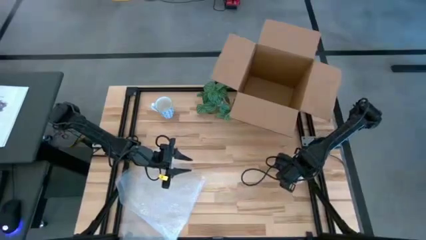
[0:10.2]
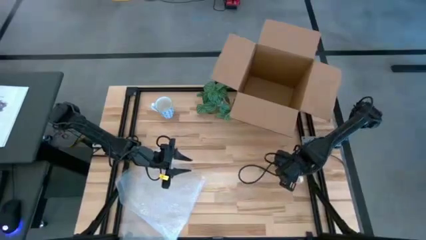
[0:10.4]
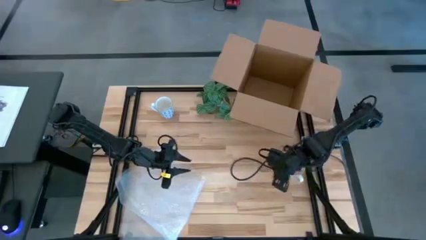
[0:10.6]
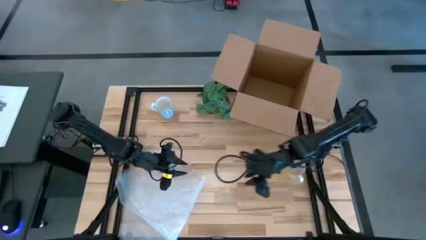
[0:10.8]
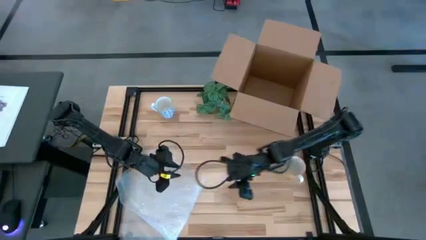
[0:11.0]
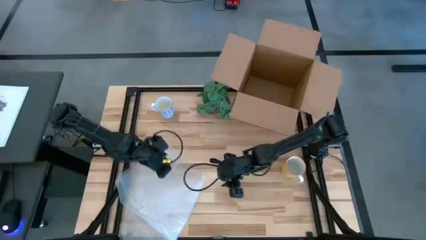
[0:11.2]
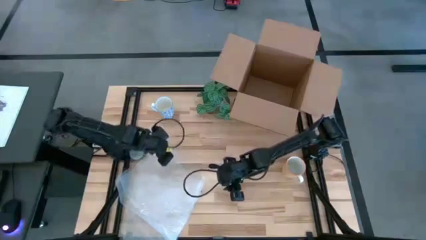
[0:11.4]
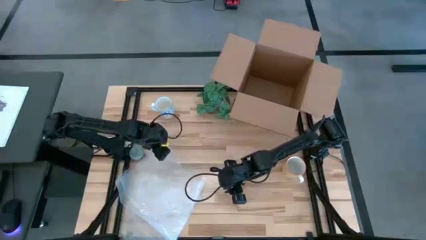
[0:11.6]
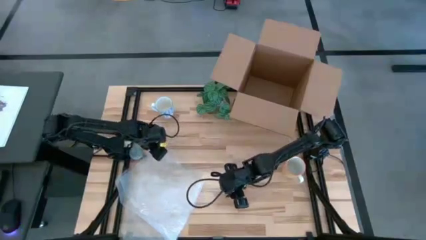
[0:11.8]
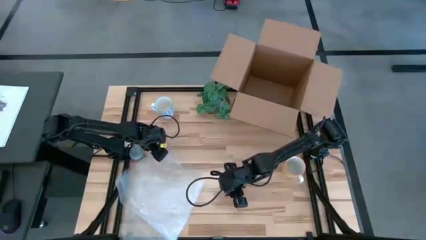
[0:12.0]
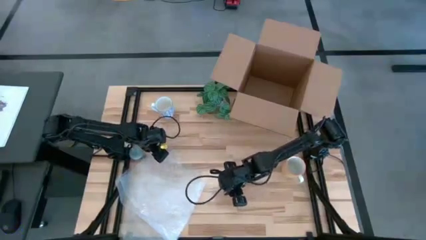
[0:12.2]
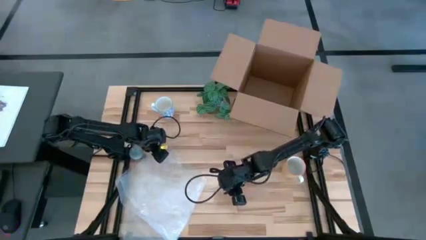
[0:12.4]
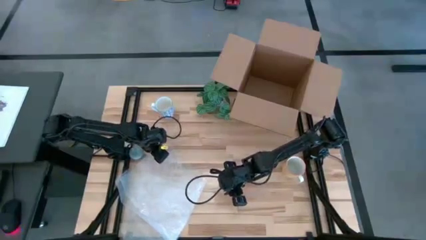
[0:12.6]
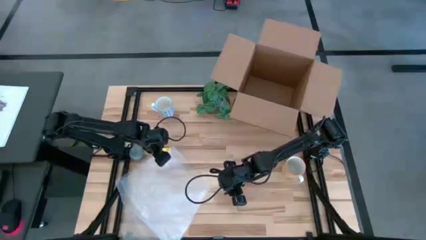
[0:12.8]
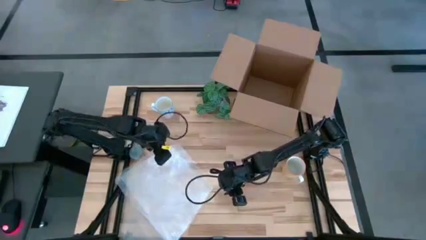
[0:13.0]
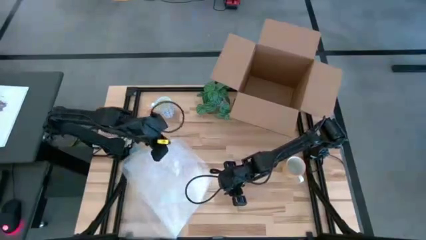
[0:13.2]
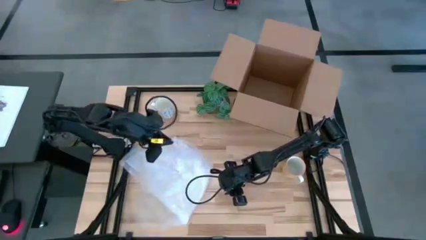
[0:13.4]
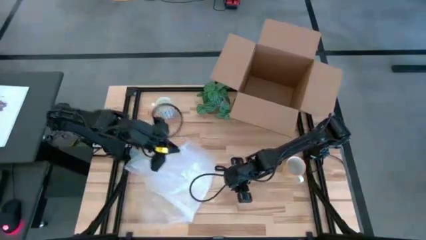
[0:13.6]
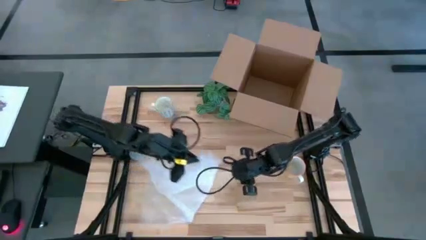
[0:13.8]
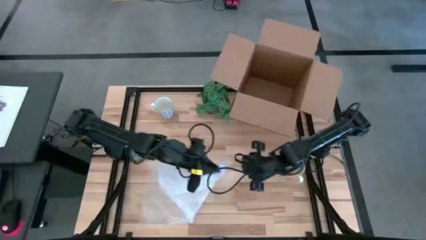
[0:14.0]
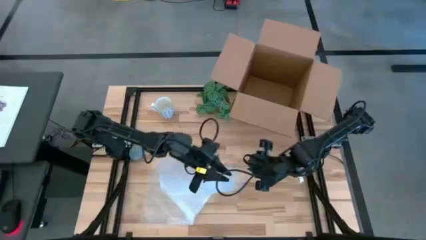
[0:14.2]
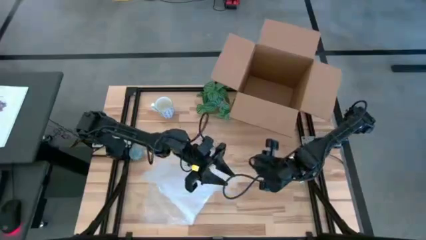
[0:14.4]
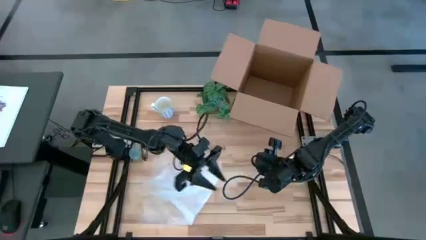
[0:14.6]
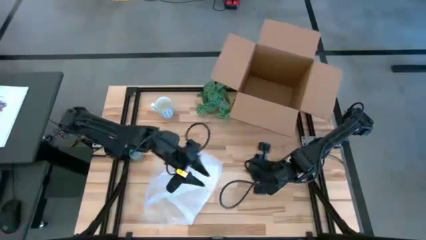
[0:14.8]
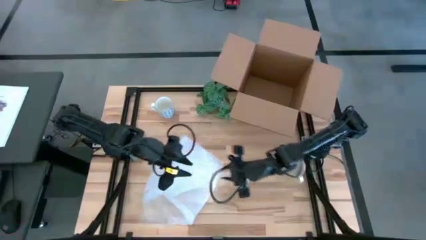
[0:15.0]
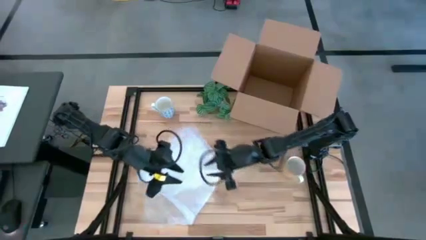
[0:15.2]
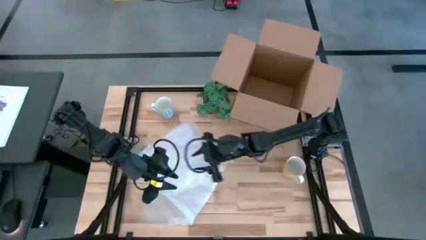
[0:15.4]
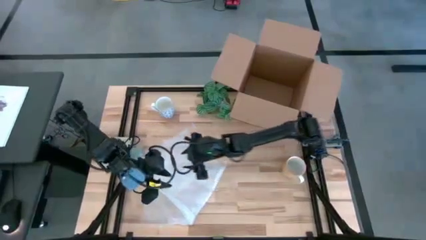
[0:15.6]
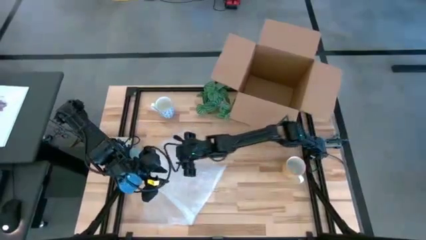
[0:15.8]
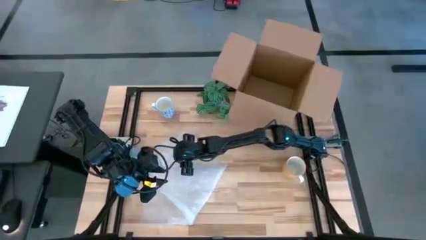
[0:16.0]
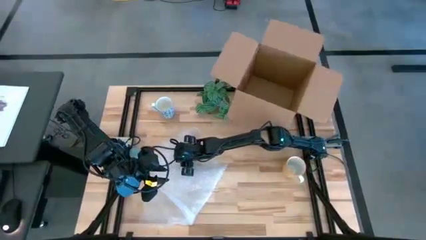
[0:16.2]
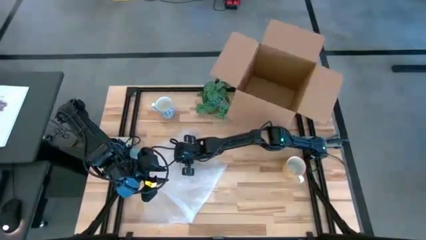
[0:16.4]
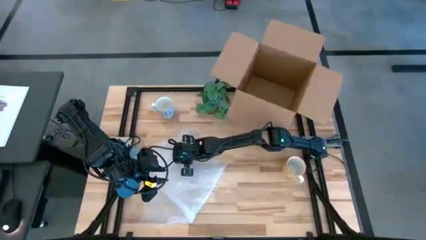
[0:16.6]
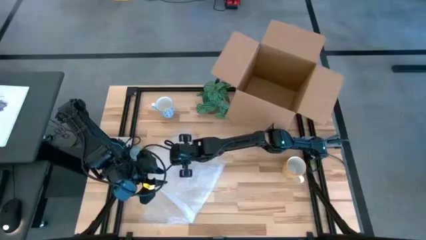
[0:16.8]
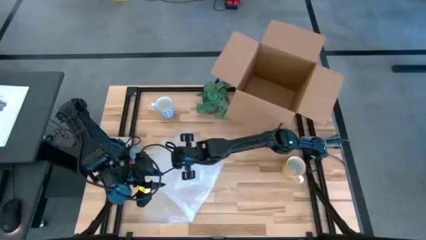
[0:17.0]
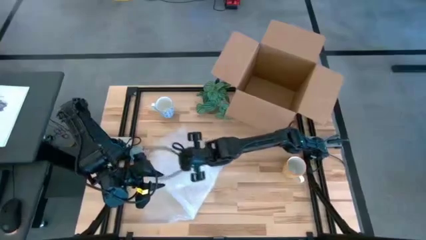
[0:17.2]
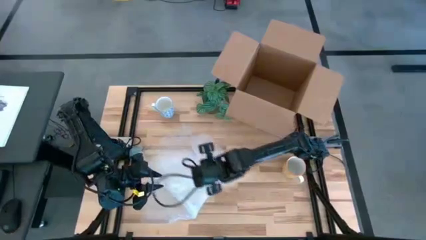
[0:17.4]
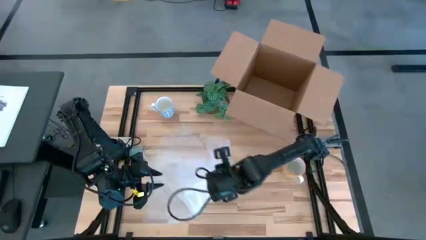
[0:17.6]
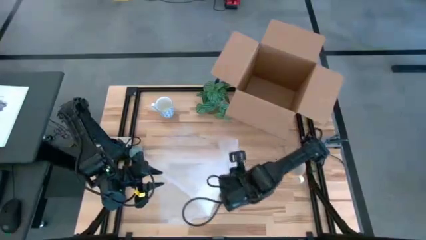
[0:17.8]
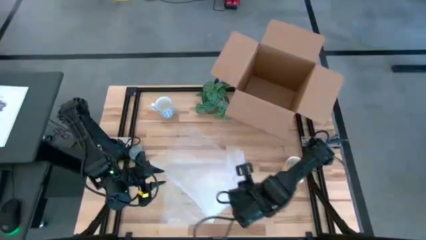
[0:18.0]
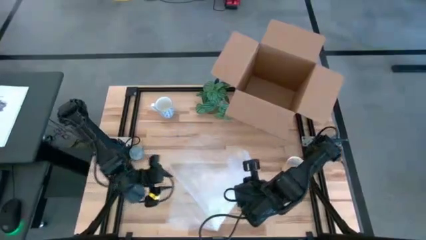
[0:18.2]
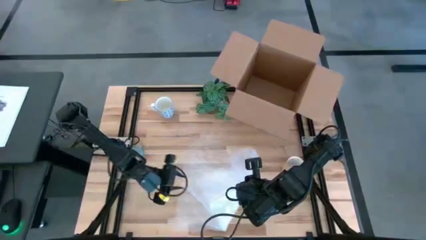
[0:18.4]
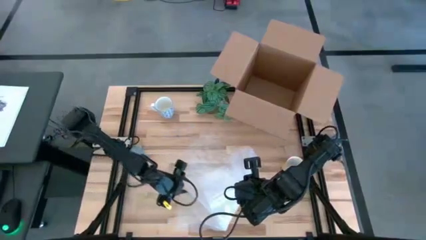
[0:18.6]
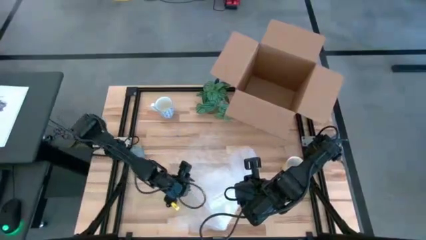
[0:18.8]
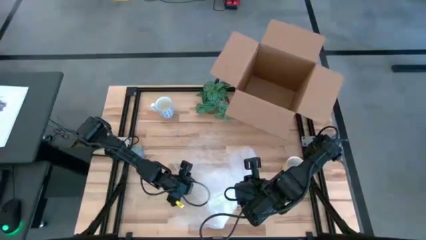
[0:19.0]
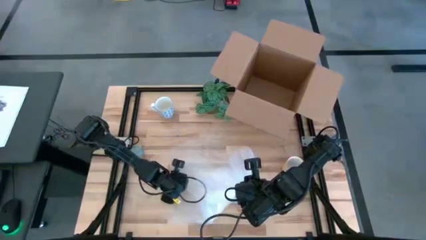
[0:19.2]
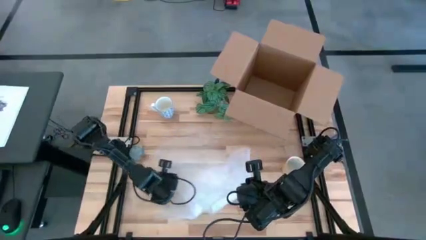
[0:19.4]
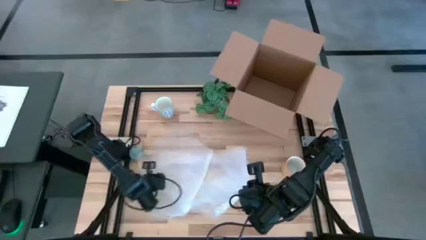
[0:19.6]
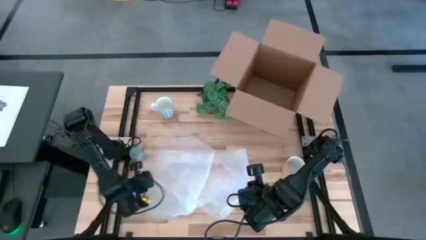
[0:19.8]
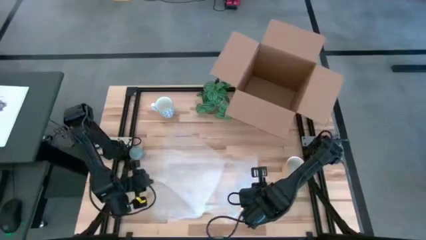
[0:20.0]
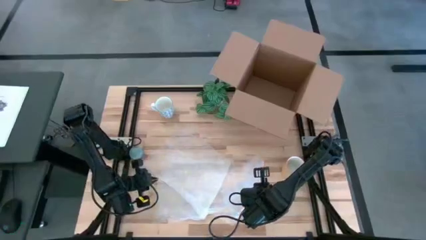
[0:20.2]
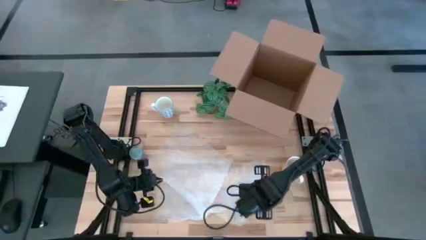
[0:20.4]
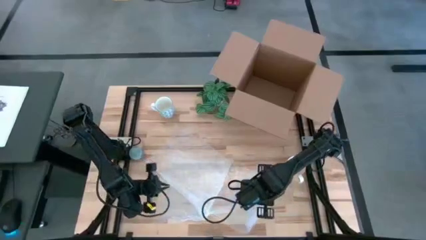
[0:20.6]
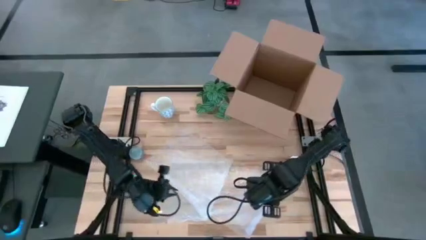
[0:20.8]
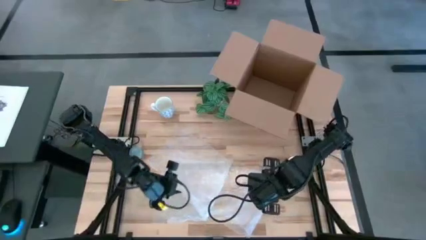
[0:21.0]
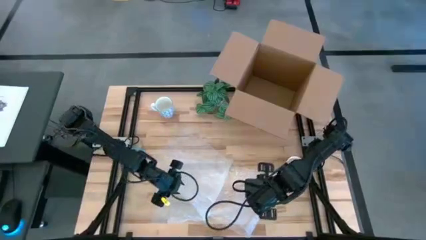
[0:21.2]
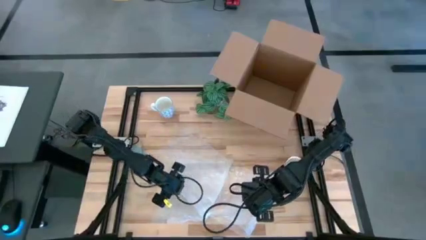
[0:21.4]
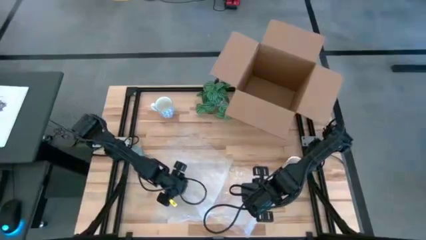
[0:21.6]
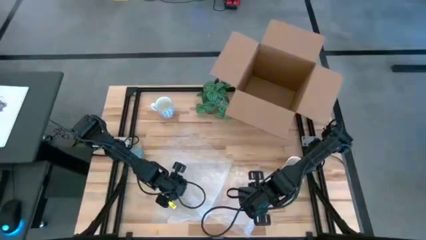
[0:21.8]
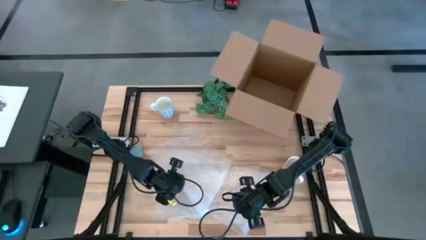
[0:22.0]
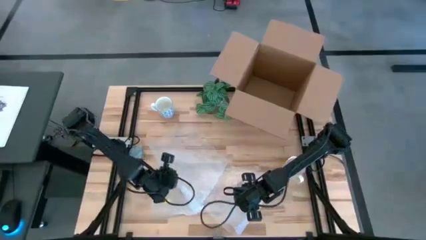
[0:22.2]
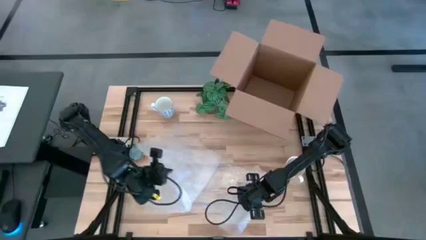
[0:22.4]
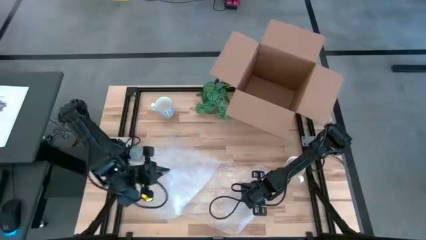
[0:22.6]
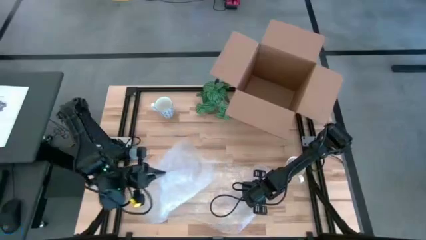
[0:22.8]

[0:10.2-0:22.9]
Task: wrap mug
Prepare the bubble wrap
